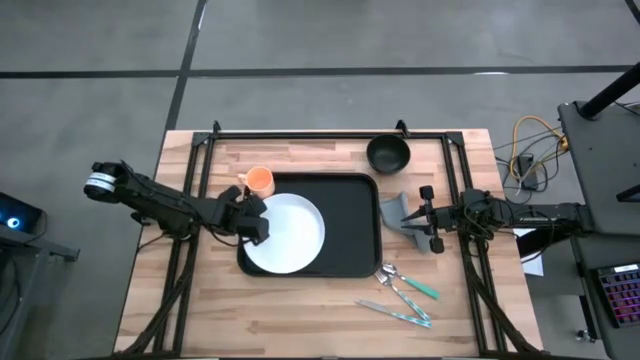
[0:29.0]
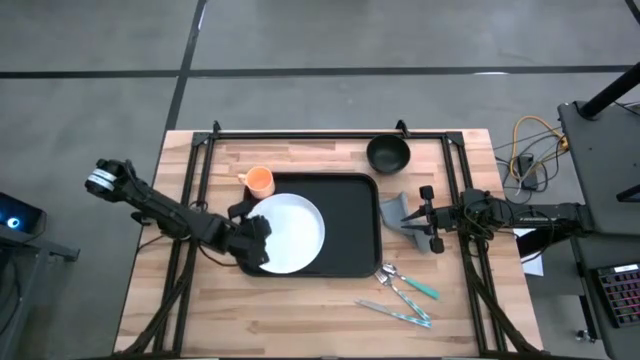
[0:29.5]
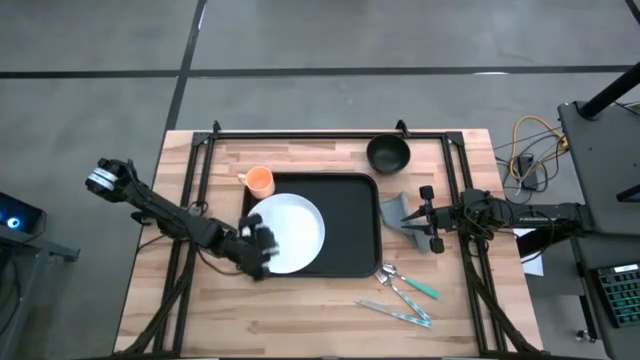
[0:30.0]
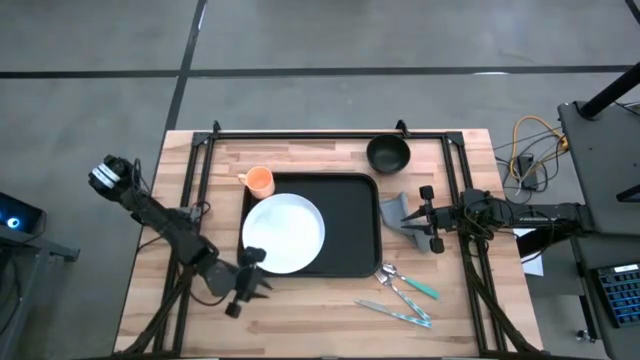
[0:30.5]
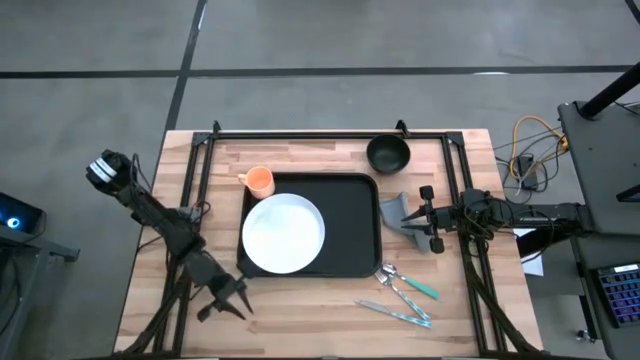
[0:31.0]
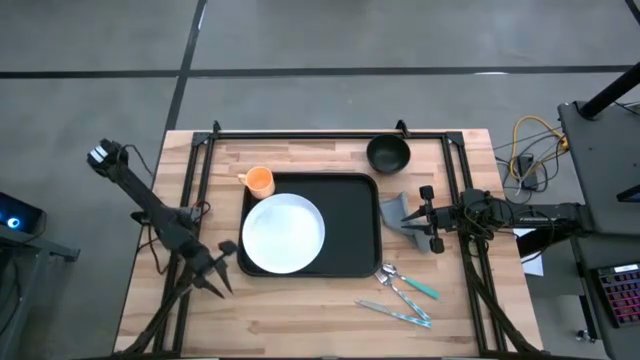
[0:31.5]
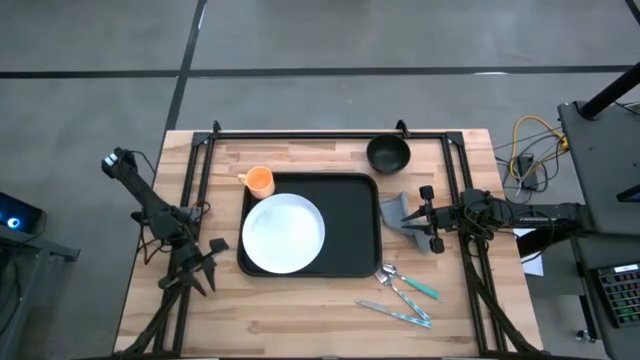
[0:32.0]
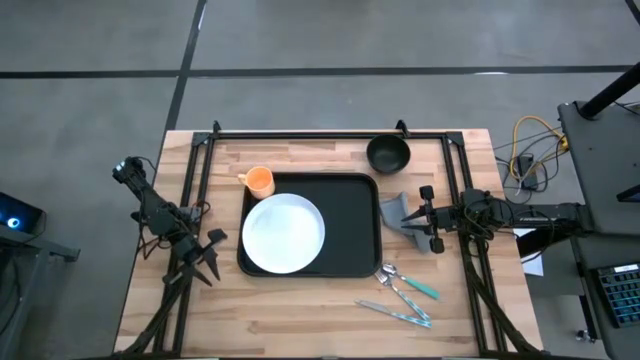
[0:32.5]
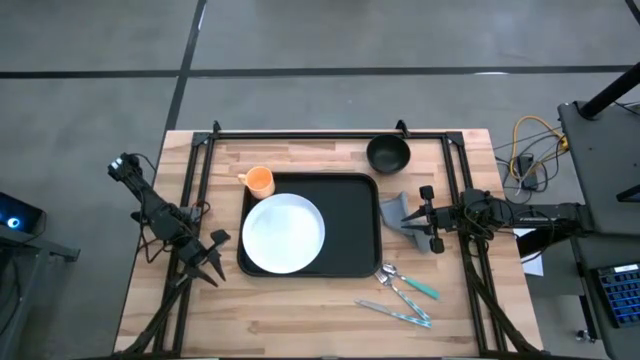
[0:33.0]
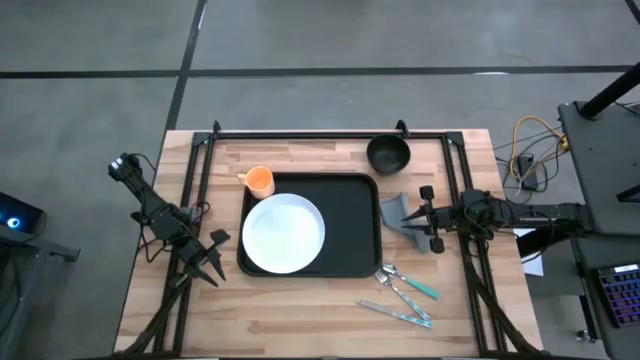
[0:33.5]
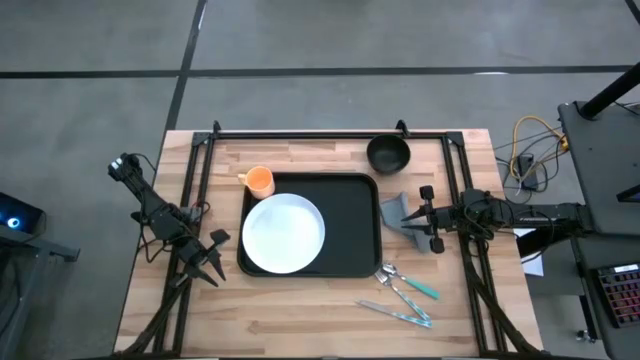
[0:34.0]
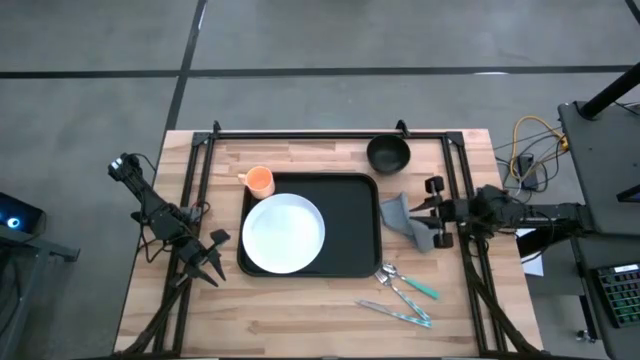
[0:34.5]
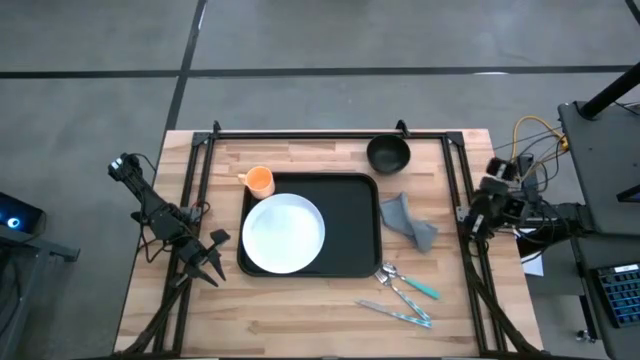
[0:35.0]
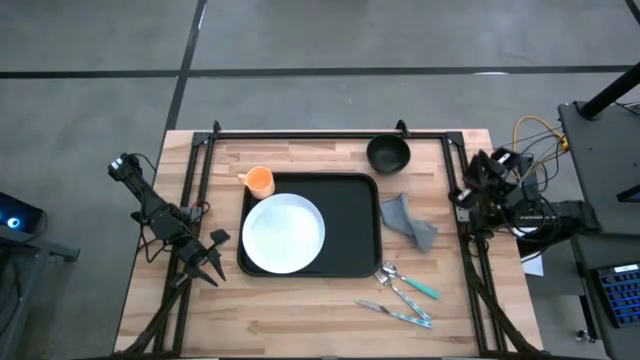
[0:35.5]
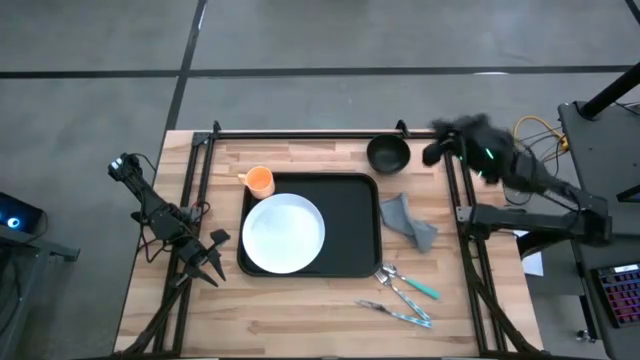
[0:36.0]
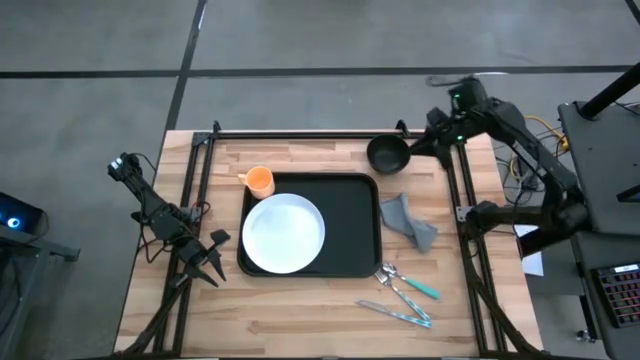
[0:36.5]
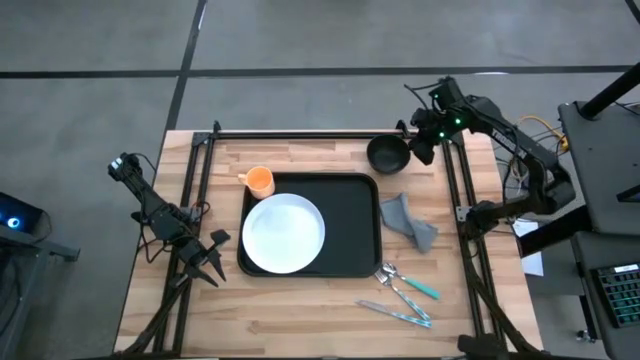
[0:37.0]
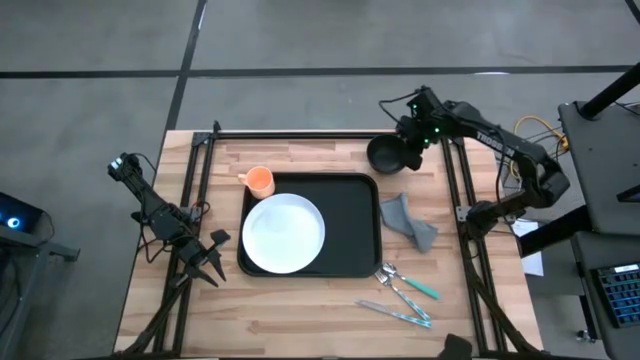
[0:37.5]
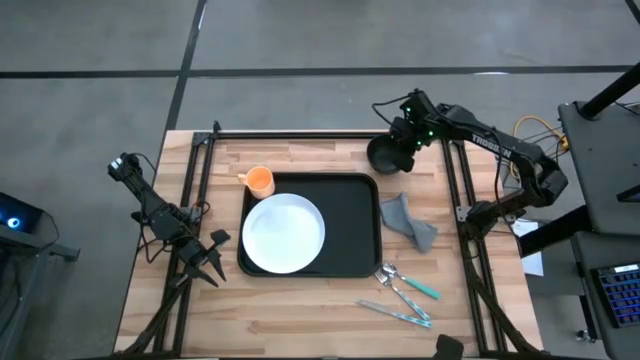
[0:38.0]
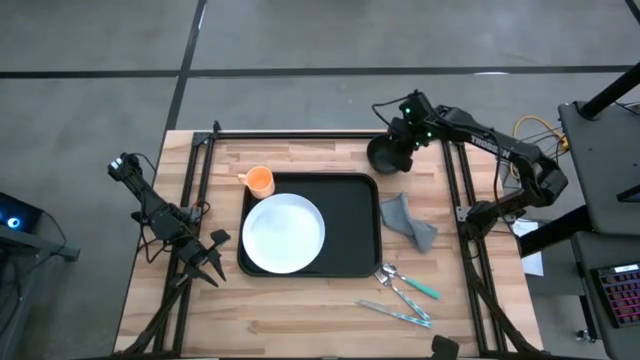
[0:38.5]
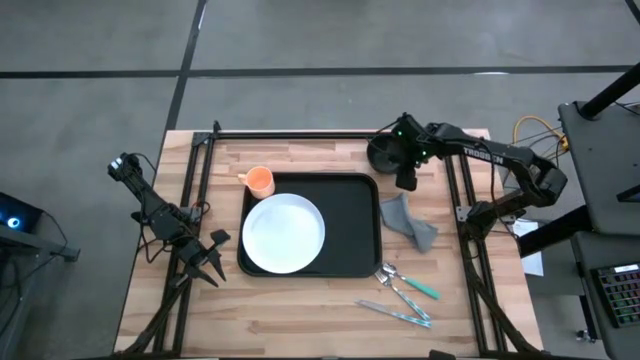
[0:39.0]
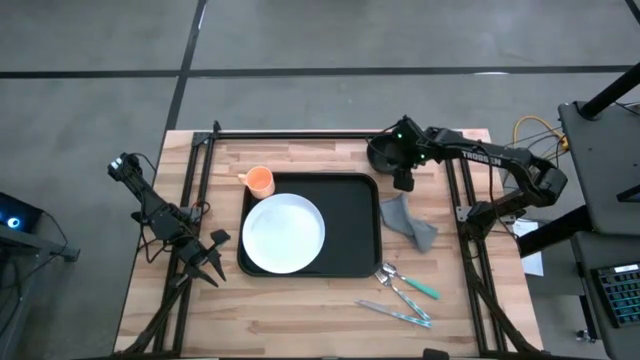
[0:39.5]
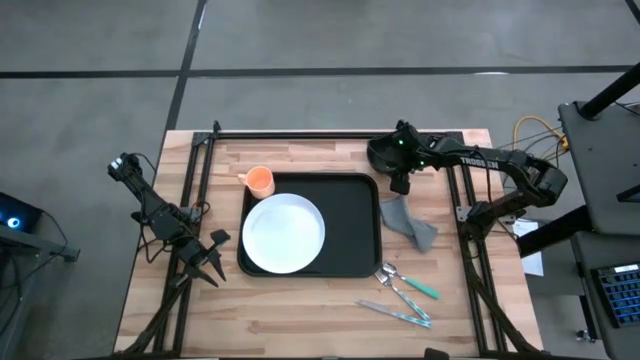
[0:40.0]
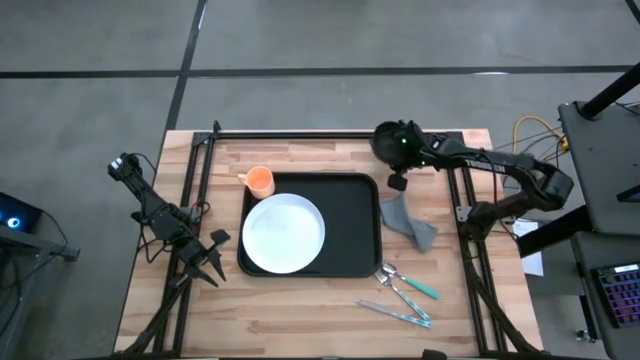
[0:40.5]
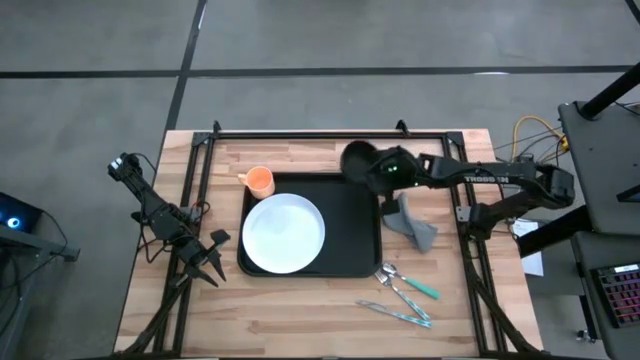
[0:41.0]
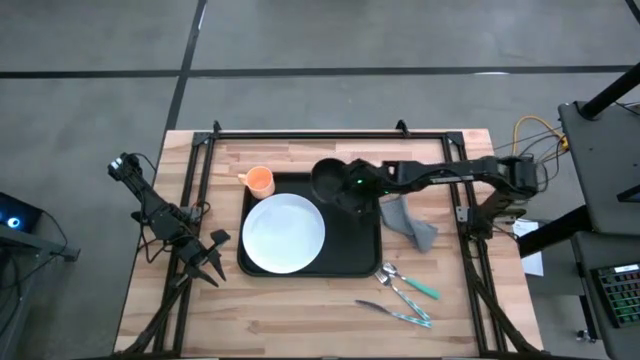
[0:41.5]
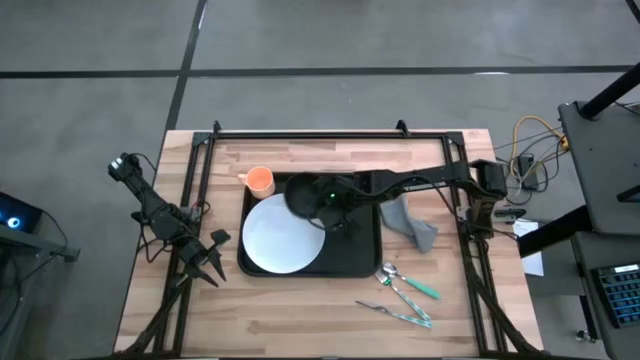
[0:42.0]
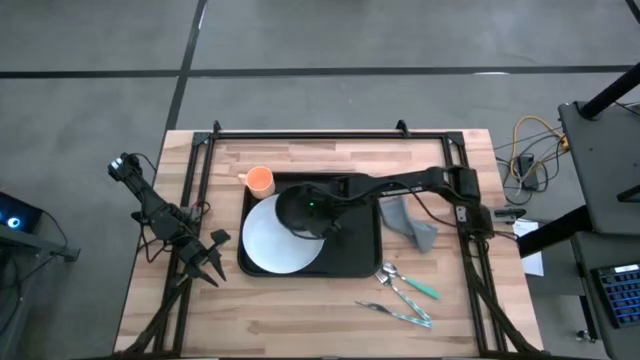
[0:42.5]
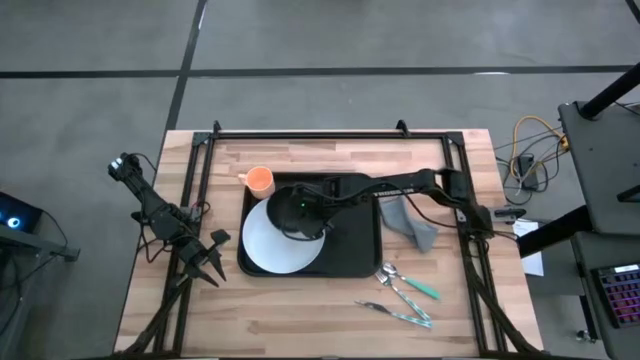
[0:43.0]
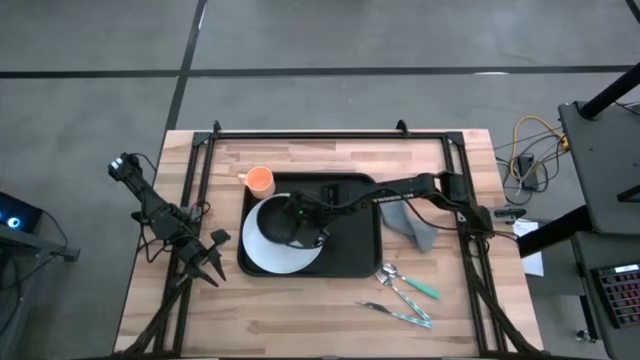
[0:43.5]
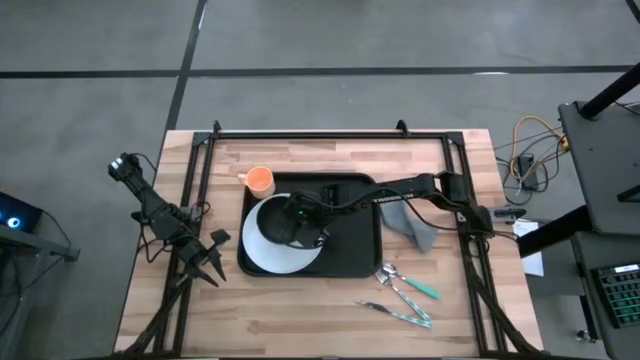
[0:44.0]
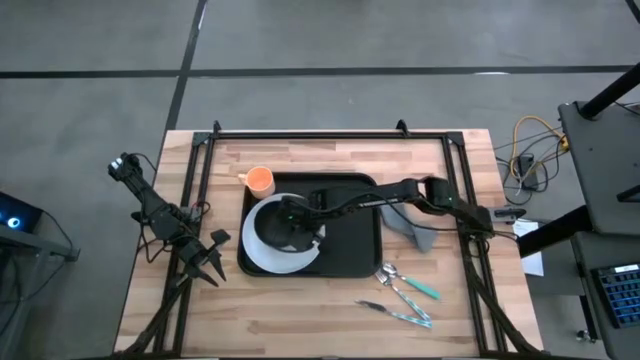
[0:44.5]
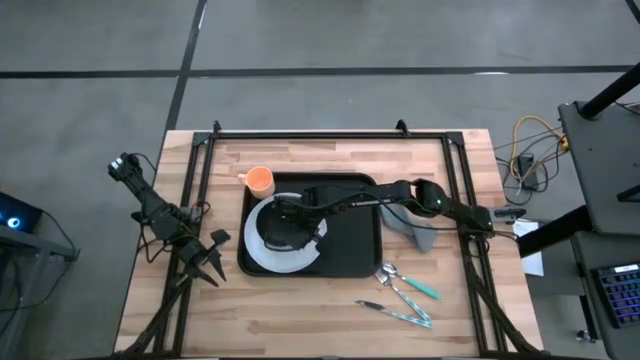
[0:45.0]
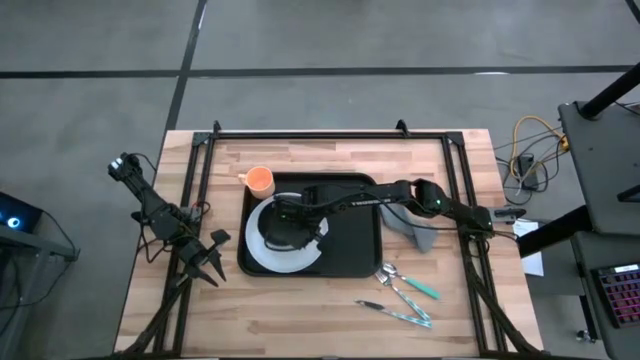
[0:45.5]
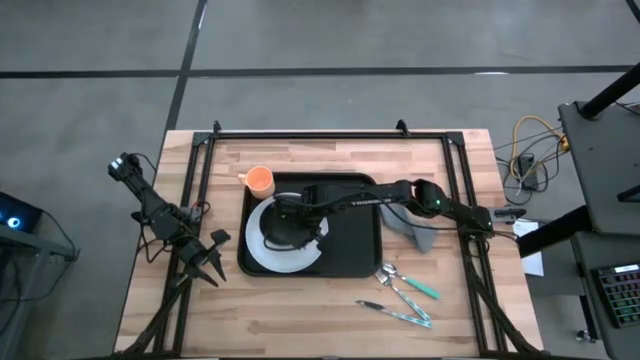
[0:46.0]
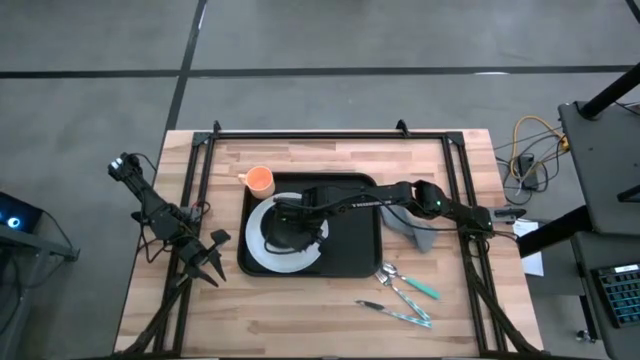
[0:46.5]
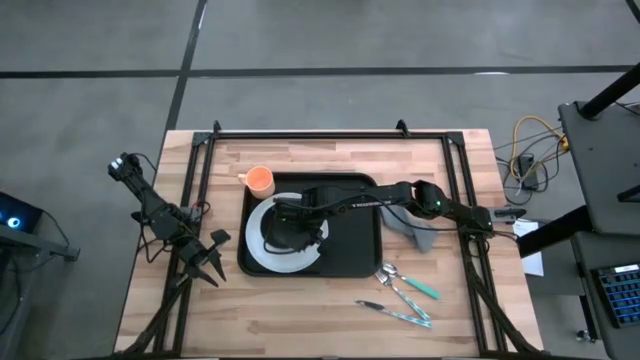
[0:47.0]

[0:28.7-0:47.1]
Task: Set up tray
Put the bowl on top of the plate in the serving tray
